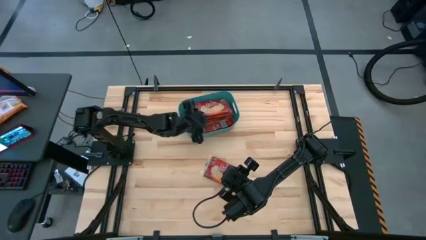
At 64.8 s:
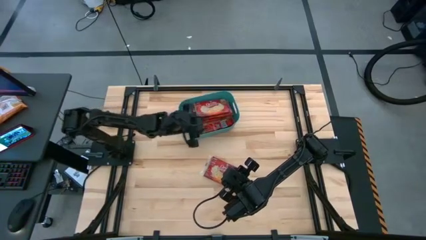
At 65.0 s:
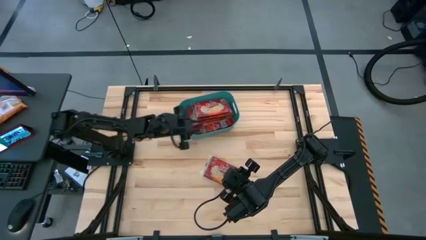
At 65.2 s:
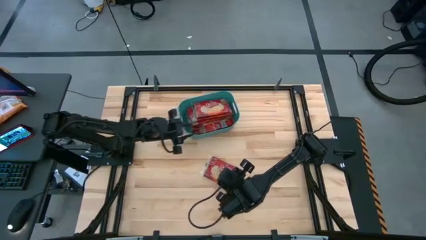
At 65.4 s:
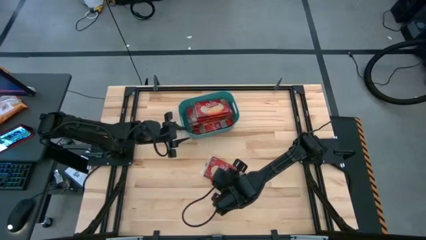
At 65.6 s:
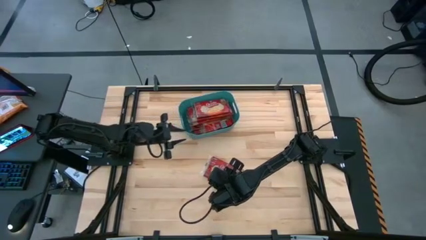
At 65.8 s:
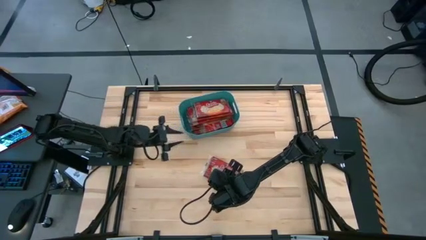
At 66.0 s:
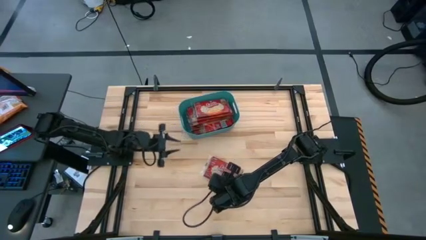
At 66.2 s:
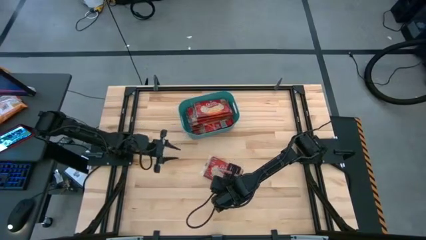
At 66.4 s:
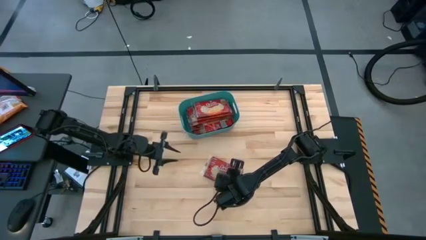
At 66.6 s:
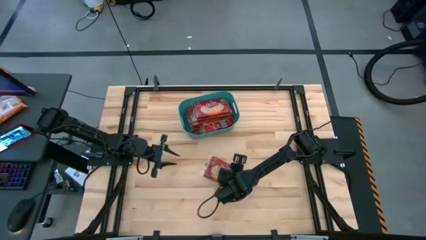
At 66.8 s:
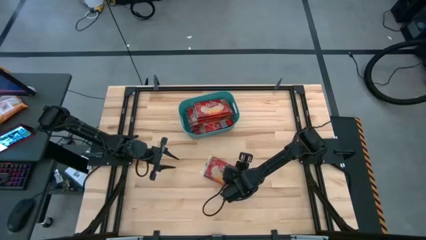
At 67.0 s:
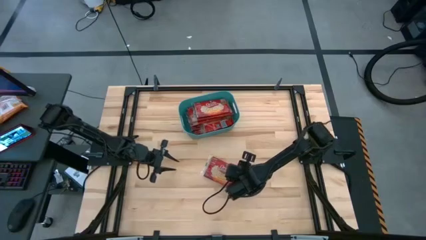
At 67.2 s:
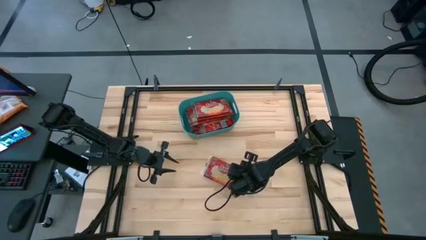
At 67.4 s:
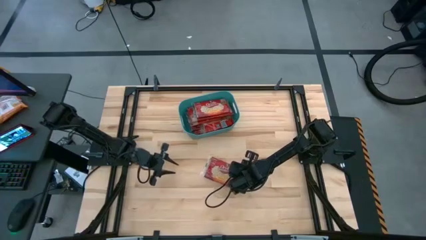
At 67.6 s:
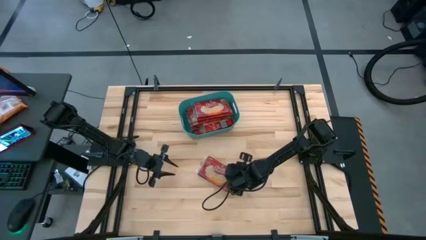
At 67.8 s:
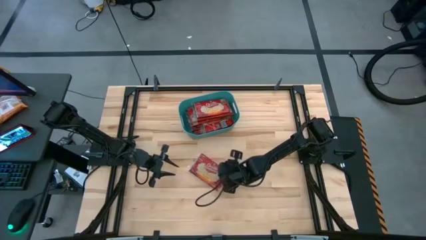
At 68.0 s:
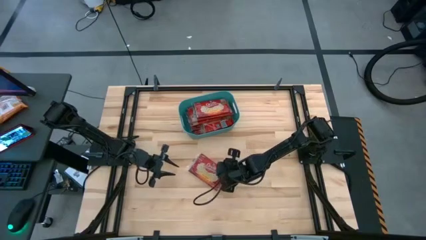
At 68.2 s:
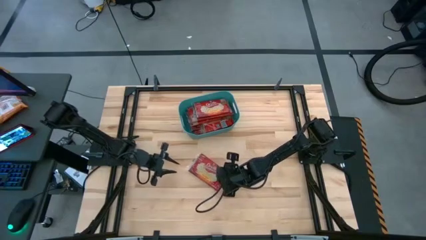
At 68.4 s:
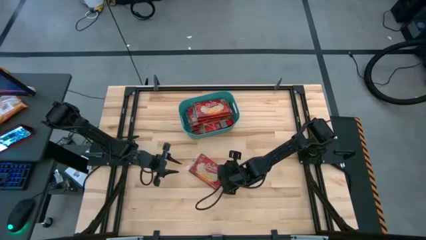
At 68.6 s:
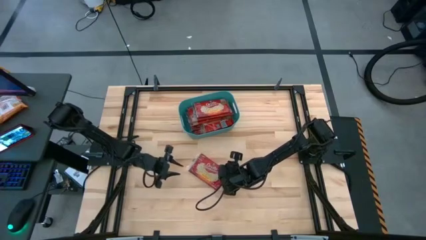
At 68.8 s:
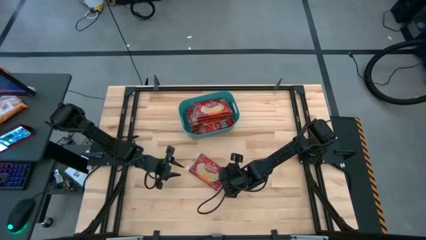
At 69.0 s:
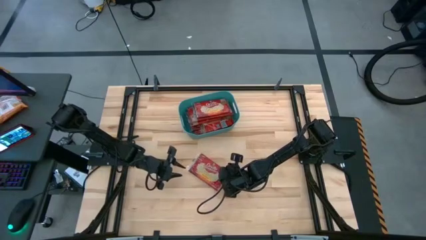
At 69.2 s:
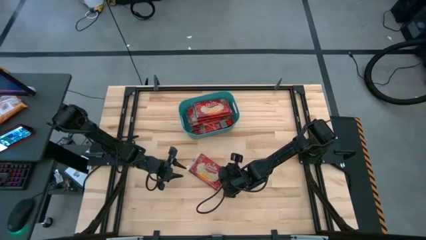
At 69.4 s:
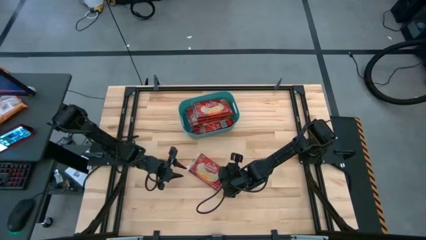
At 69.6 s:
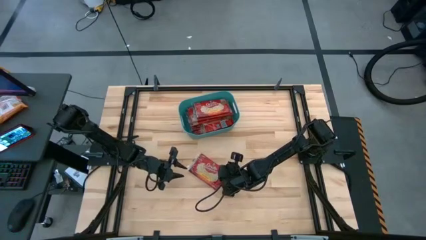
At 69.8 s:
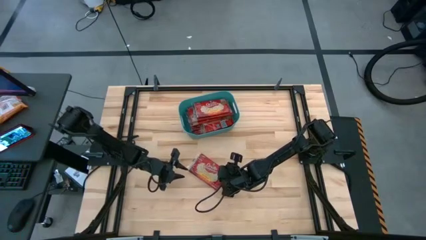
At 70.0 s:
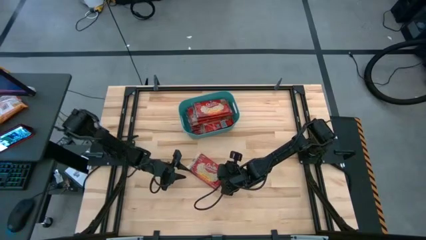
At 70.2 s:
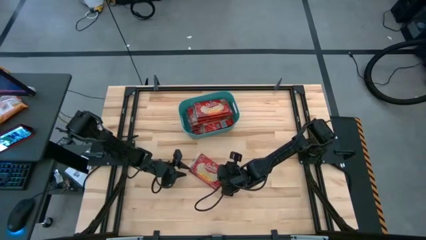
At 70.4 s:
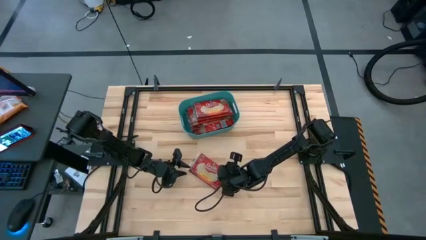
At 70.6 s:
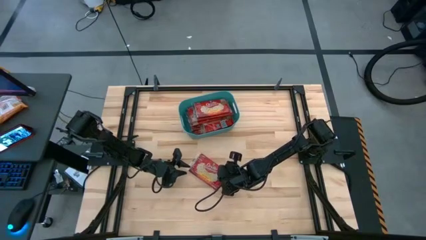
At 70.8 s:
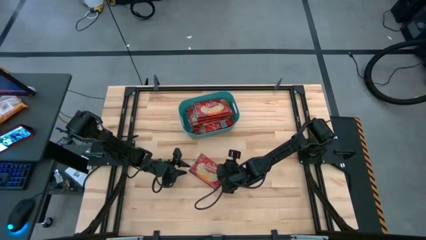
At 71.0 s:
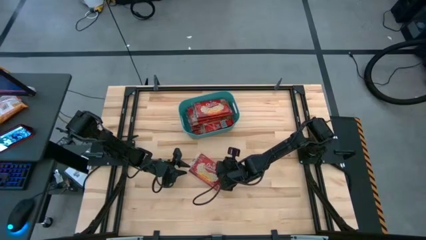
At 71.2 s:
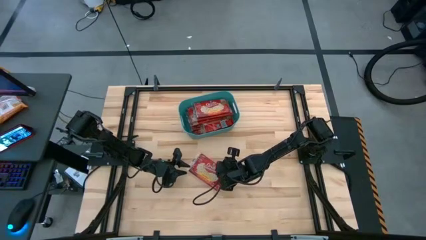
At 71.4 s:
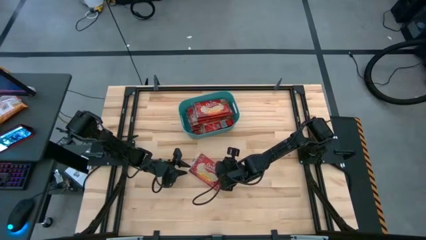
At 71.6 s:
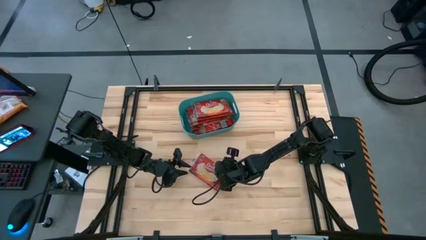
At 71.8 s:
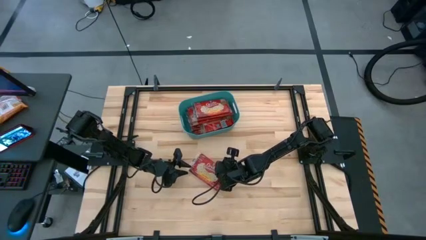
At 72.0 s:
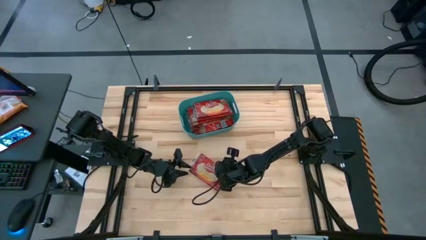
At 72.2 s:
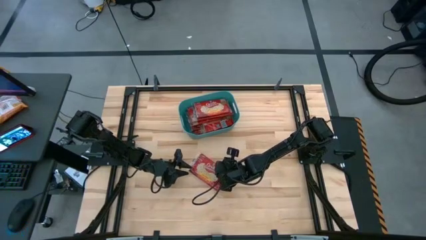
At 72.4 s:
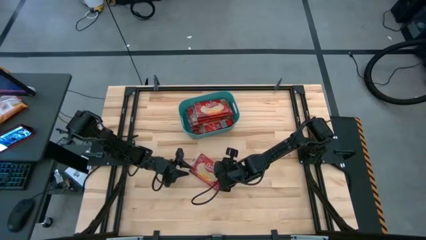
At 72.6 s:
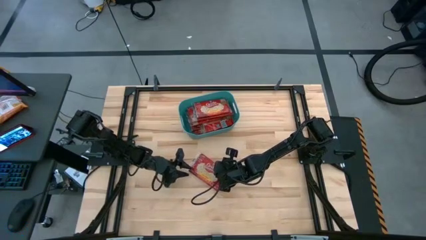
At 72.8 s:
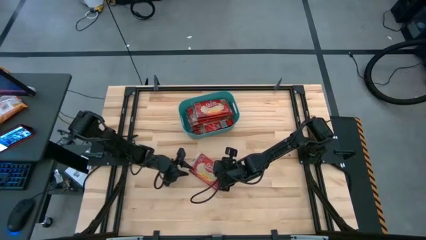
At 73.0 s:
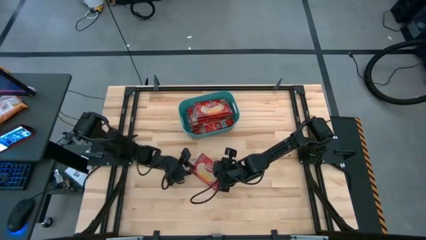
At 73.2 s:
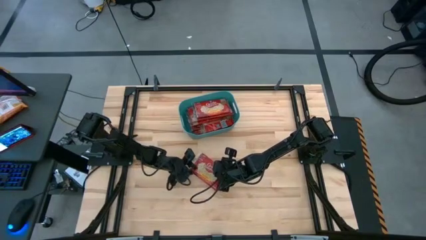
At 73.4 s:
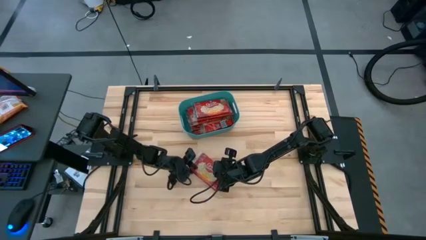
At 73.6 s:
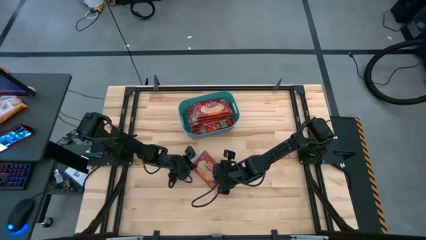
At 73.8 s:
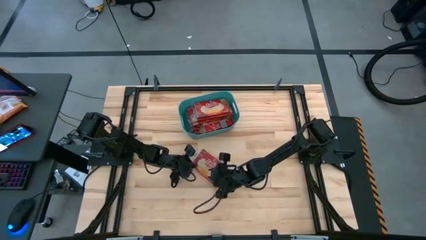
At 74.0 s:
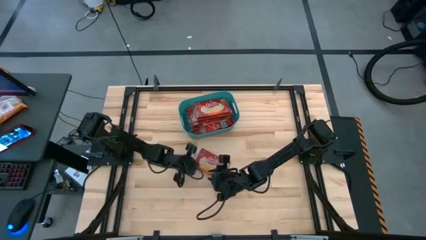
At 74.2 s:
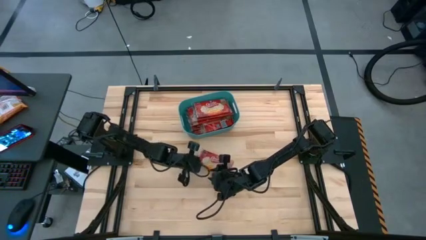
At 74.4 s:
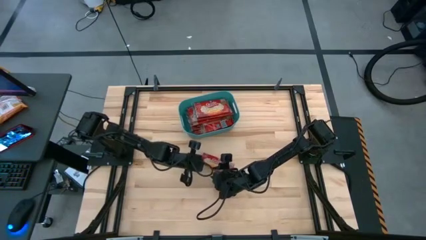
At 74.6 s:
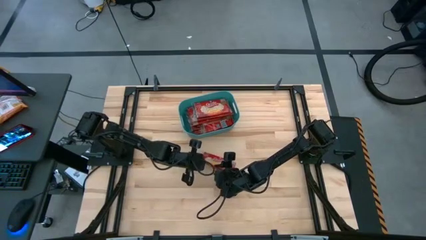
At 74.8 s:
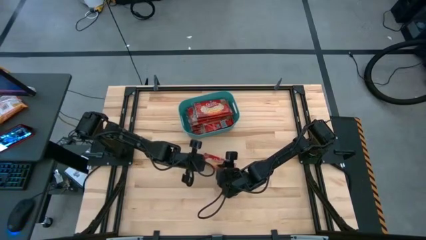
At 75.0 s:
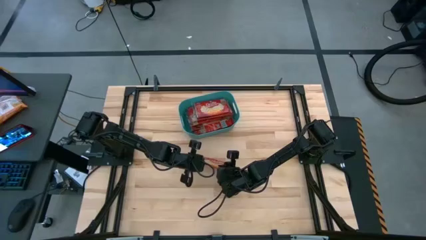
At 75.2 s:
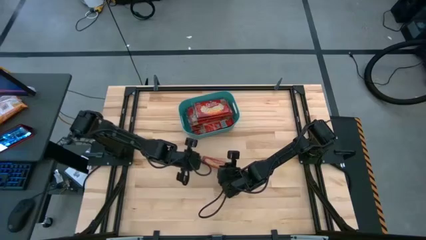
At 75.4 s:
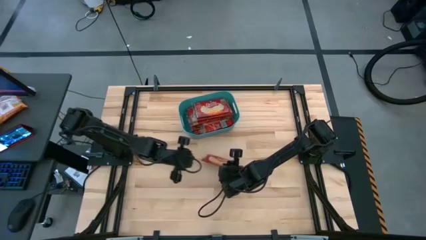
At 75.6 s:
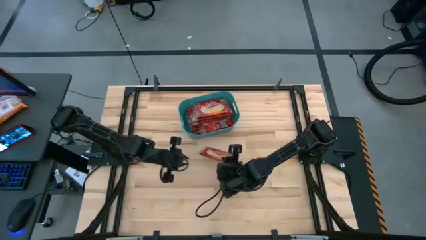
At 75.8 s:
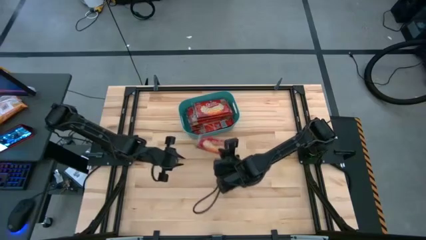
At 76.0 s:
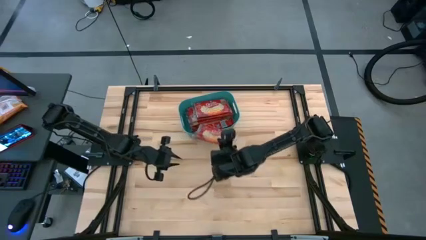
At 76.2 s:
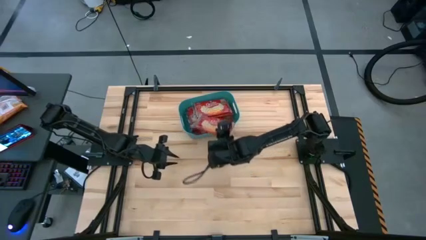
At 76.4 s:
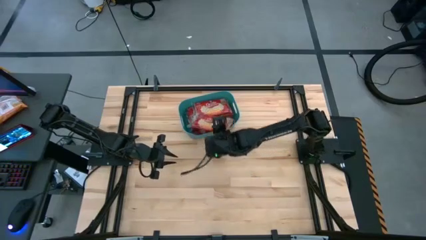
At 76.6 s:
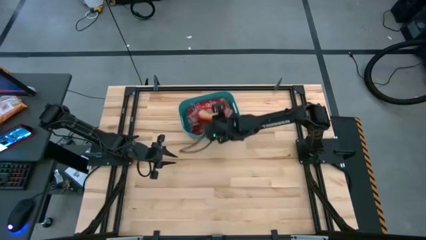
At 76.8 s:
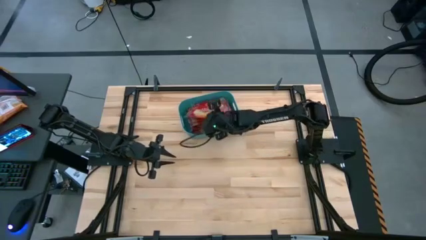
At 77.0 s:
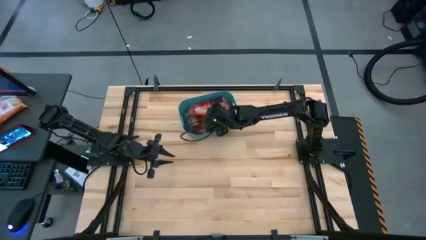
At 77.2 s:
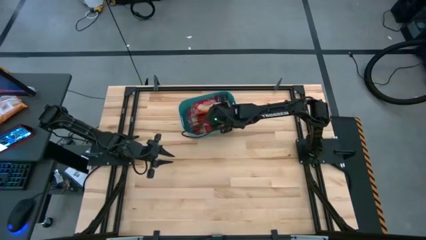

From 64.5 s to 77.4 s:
Task: Sort popcorn bags into baskets
Put the red popcorn bag into the green bin

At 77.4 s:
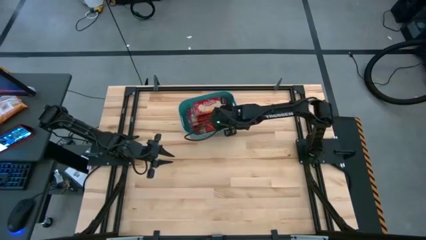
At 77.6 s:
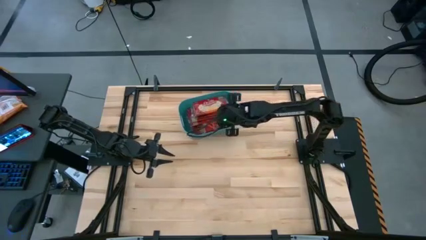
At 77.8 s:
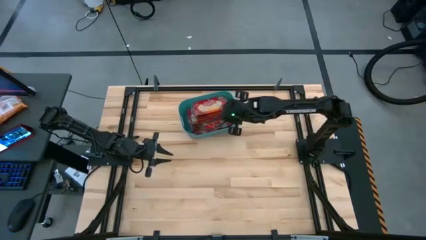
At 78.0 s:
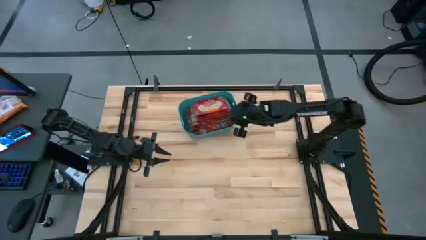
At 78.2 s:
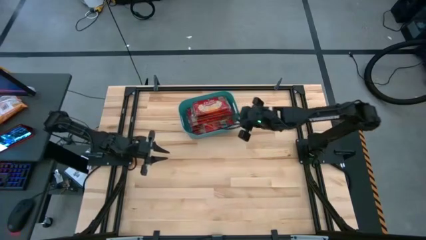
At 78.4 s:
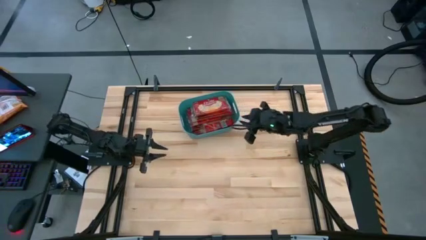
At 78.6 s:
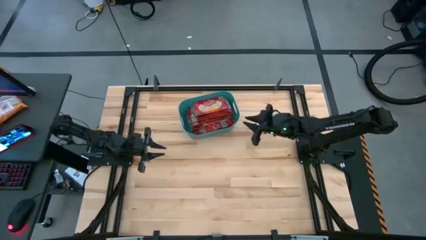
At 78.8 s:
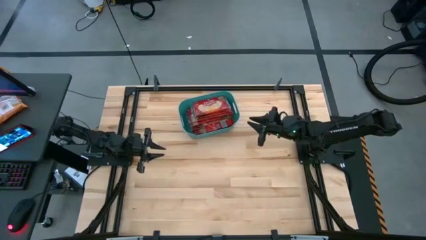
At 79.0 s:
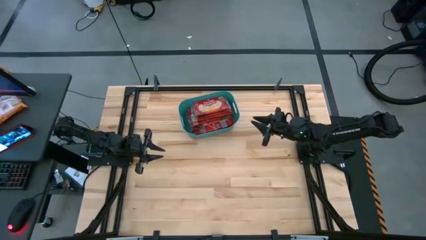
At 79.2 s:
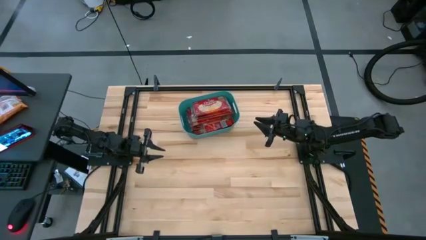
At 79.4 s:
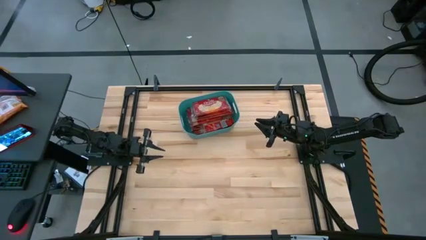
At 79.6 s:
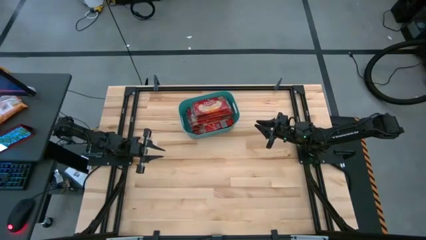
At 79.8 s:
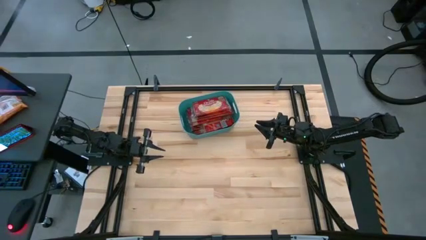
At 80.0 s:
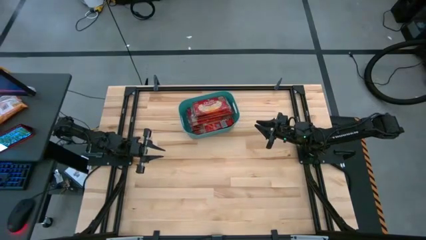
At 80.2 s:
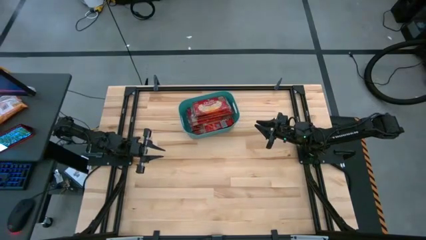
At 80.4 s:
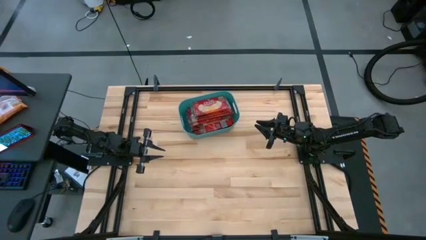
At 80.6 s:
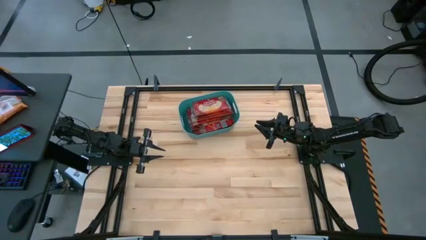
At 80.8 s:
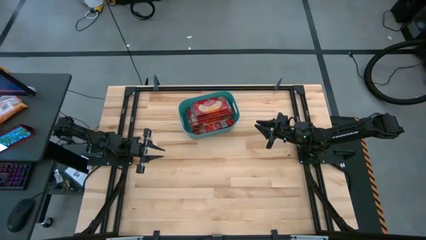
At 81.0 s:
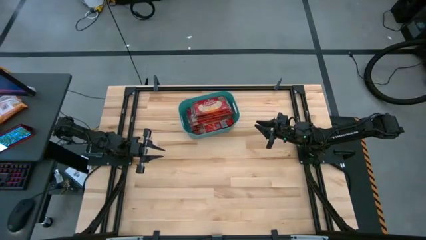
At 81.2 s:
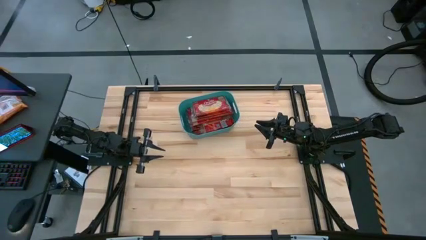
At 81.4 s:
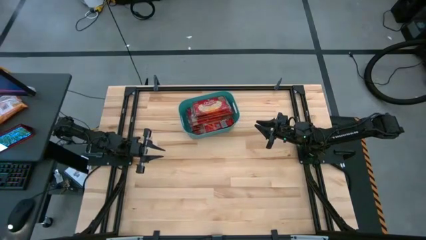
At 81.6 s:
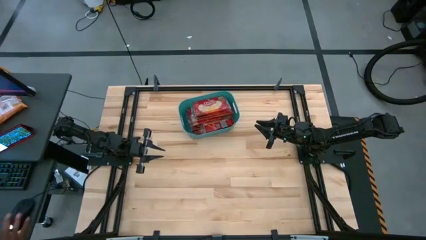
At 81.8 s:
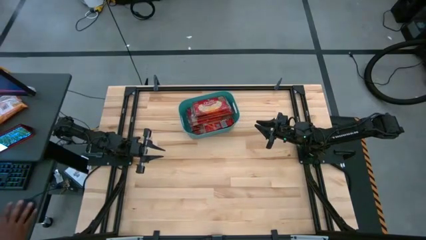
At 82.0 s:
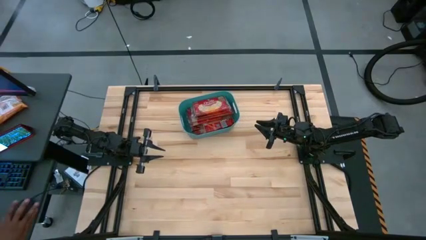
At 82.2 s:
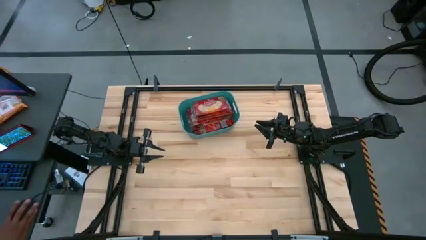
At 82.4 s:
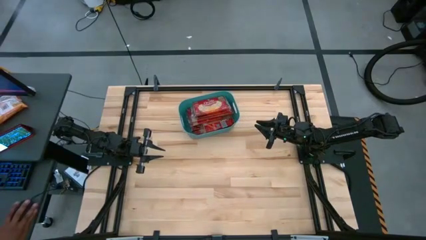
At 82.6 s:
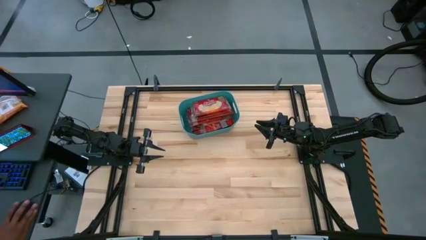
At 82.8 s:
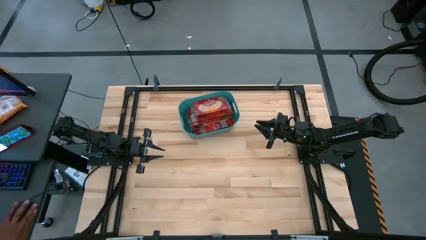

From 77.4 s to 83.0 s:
Return to Home Position
